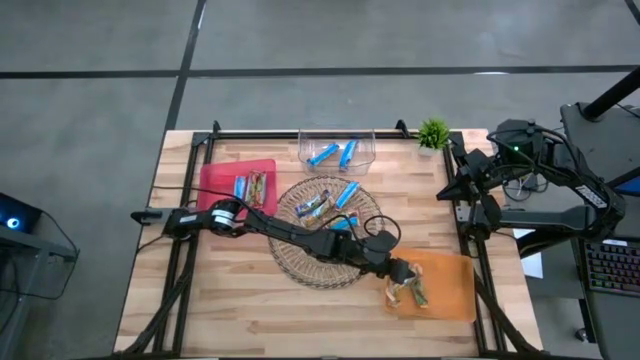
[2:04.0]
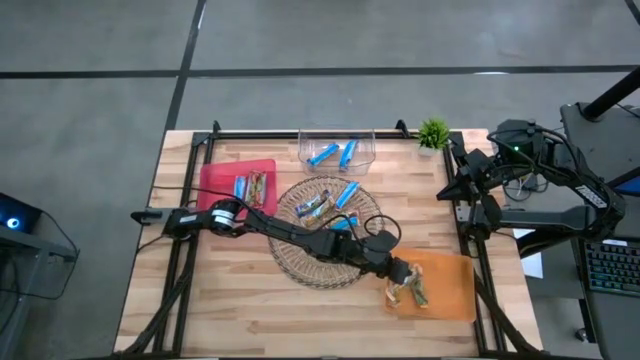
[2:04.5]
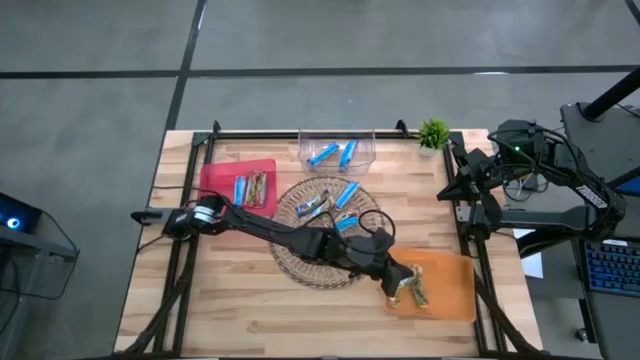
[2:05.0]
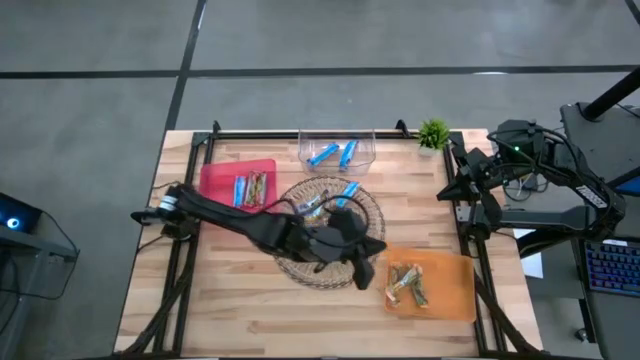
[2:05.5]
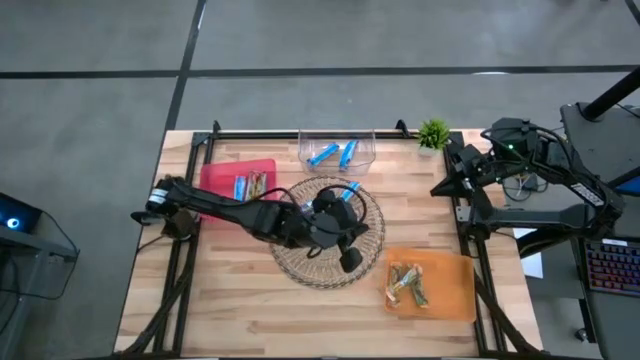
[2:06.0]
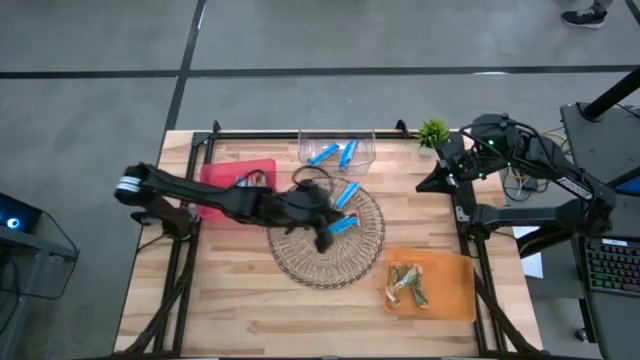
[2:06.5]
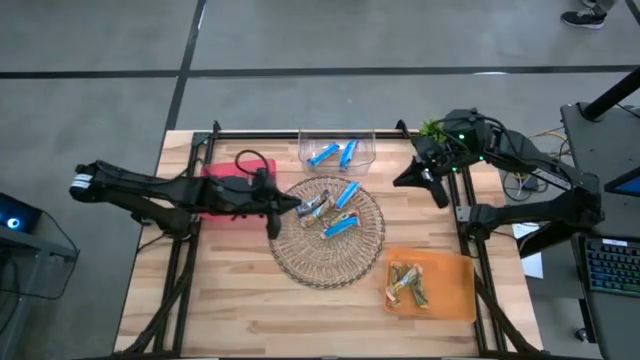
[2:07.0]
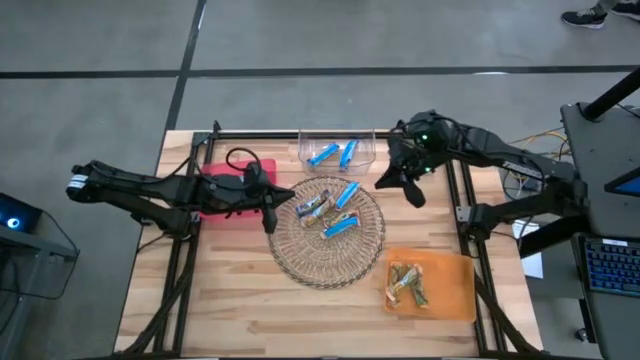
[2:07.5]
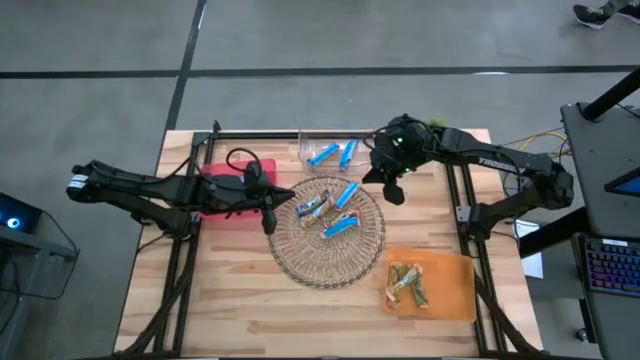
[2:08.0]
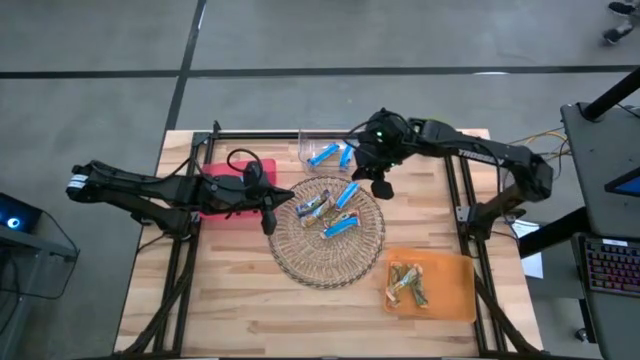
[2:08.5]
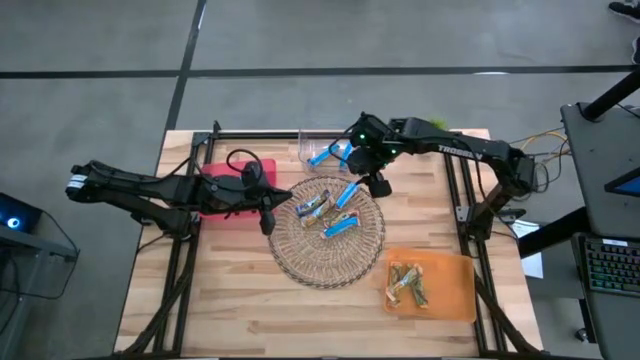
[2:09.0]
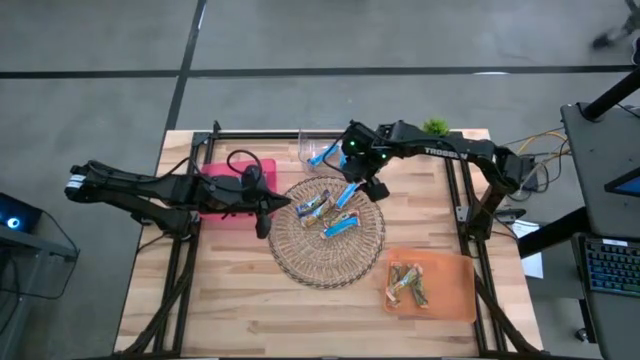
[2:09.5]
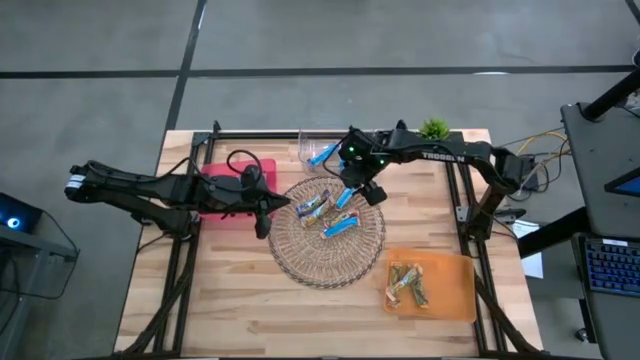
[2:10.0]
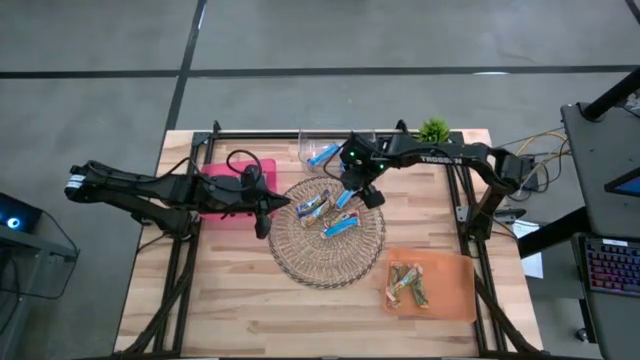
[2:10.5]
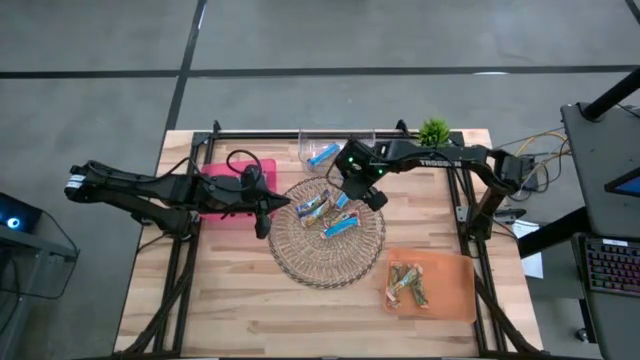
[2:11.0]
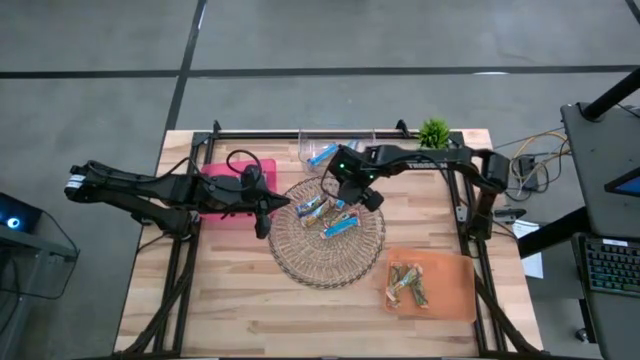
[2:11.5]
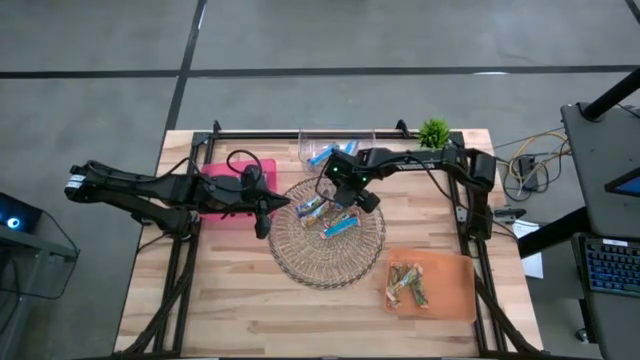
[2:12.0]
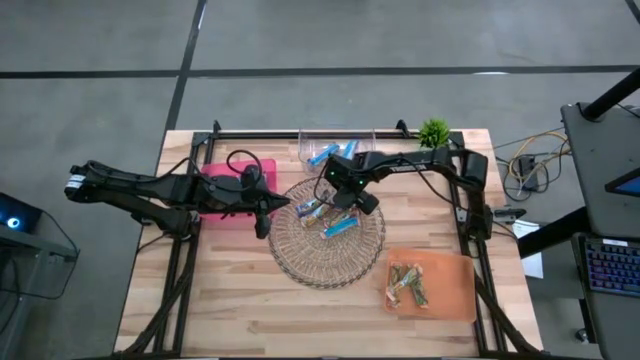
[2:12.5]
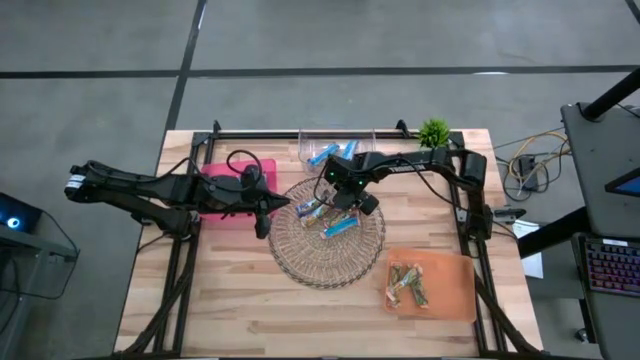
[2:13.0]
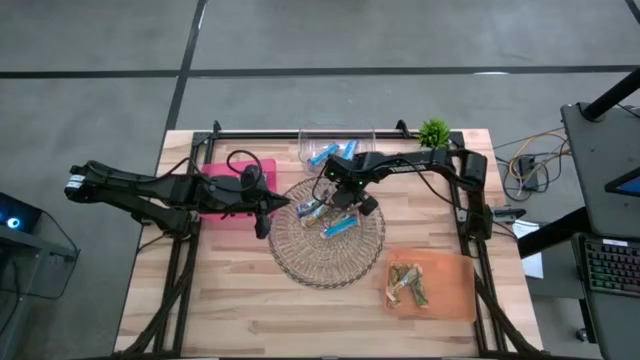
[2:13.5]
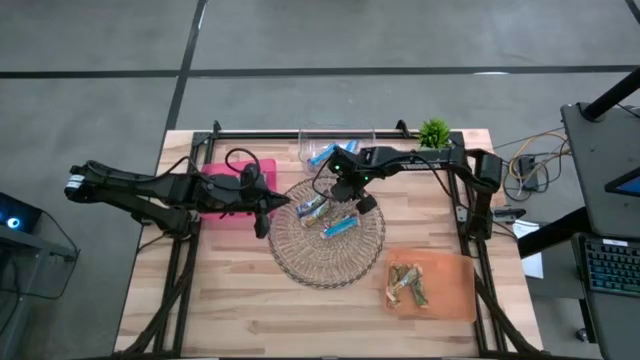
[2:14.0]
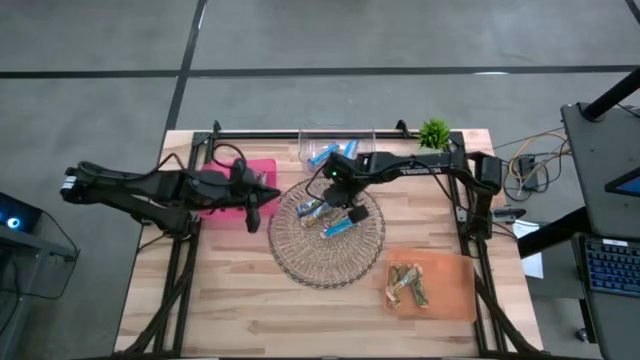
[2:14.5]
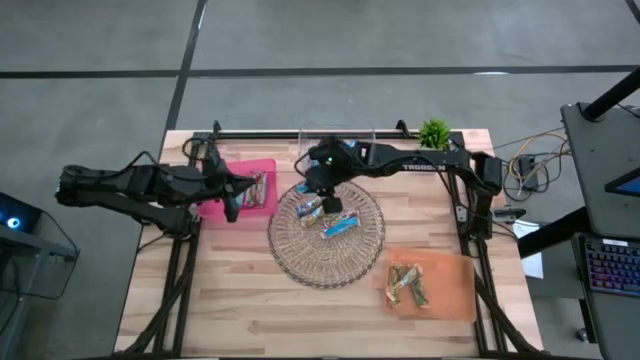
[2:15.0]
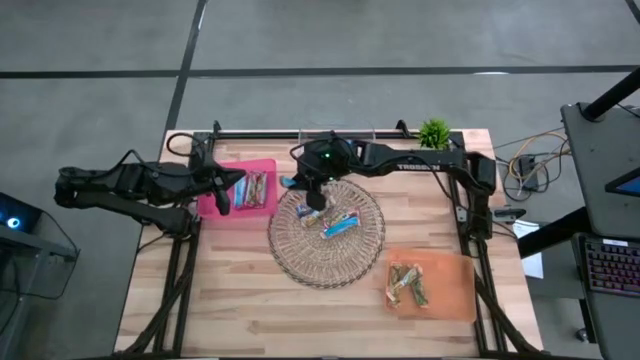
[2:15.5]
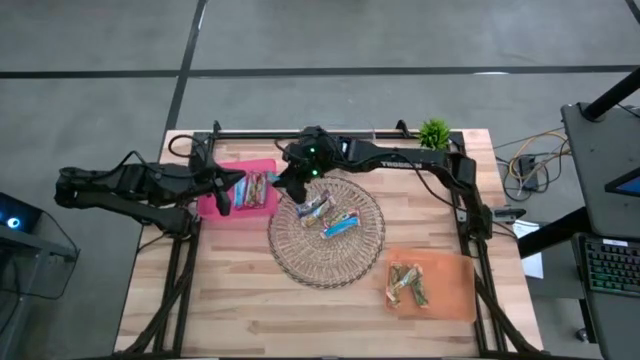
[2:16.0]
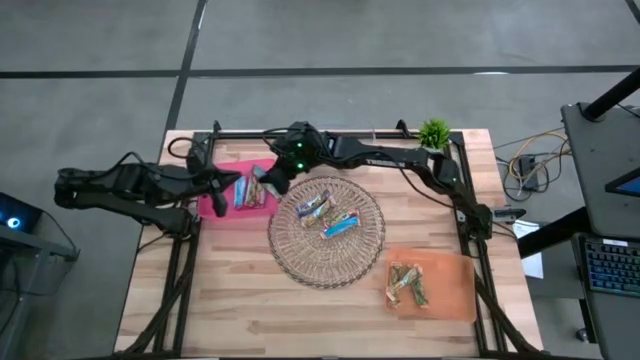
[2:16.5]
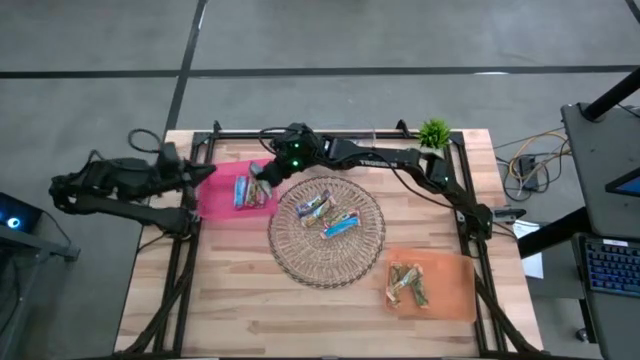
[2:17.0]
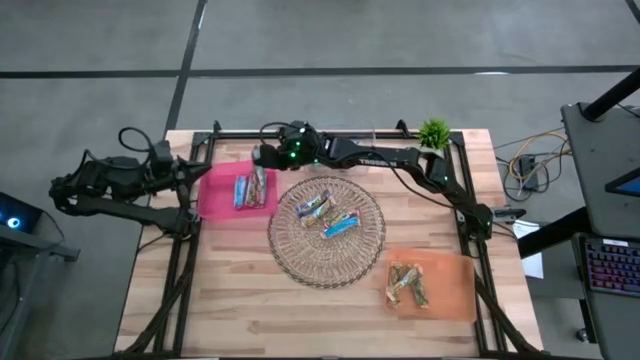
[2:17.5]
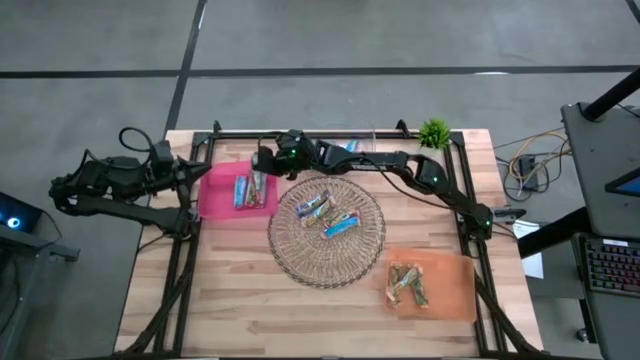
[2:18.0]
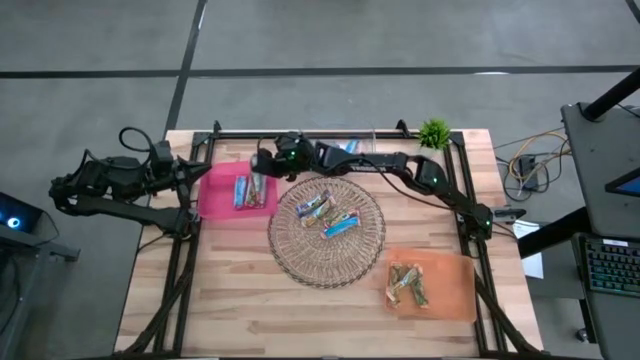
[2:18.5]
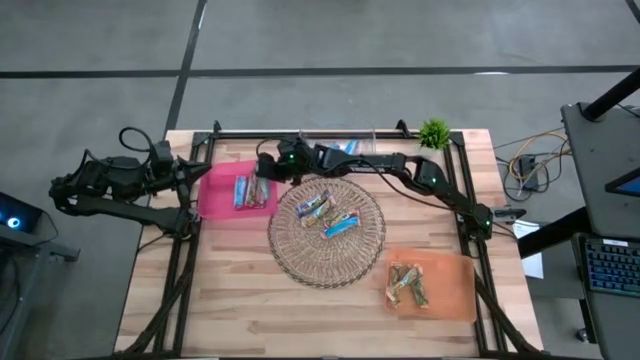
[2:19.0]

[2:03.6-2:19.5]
Task: Pick and place Granola Bars by type
Put the red granola bar into the red bin

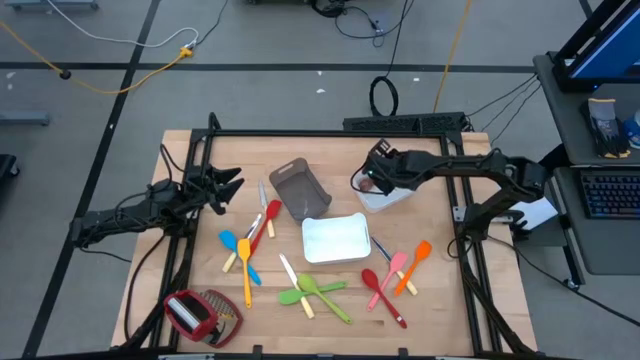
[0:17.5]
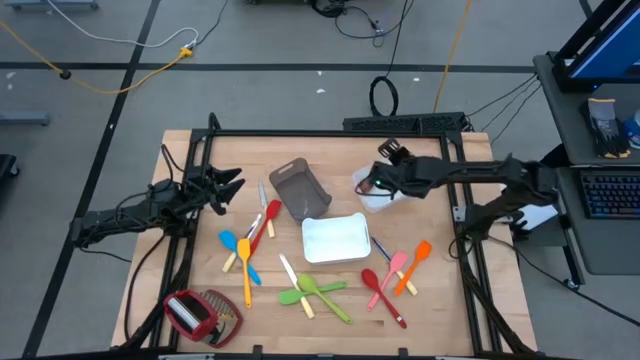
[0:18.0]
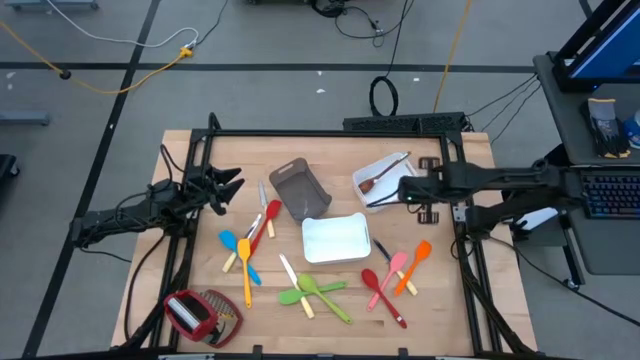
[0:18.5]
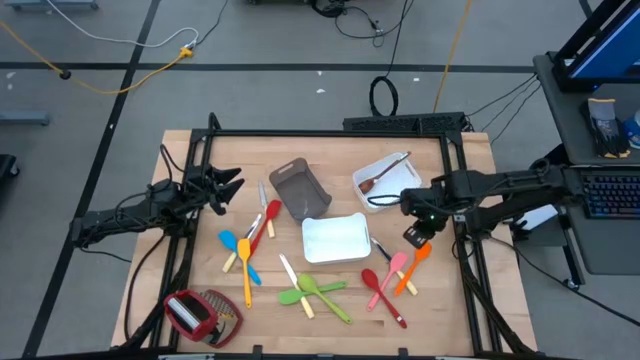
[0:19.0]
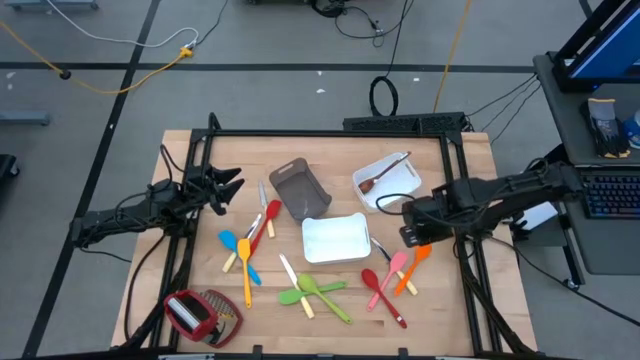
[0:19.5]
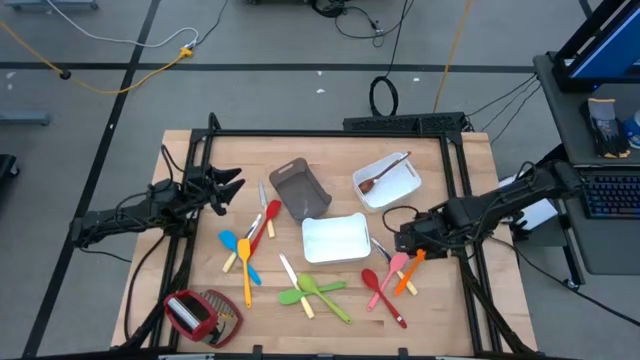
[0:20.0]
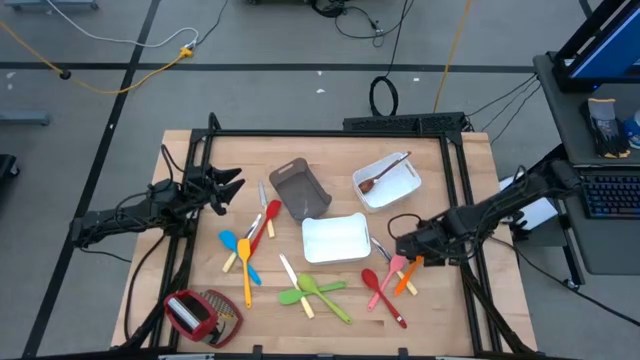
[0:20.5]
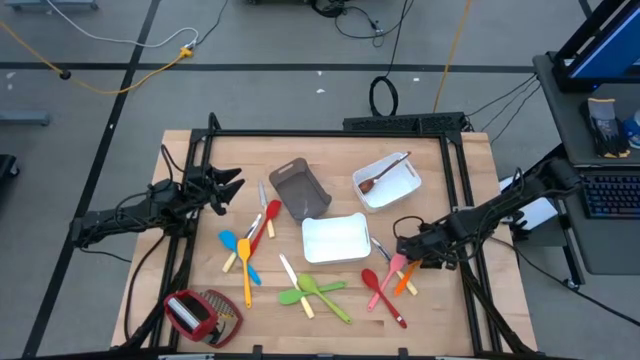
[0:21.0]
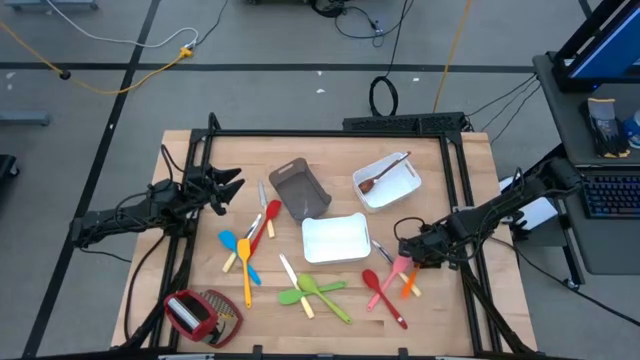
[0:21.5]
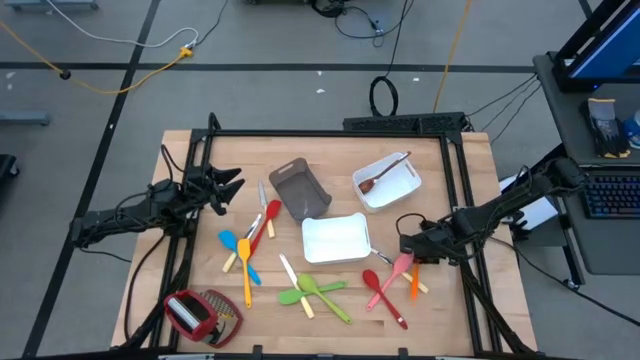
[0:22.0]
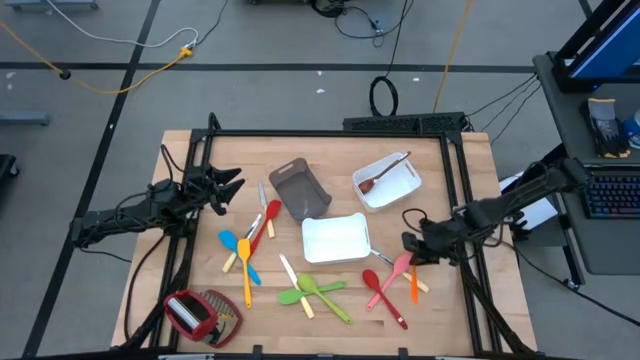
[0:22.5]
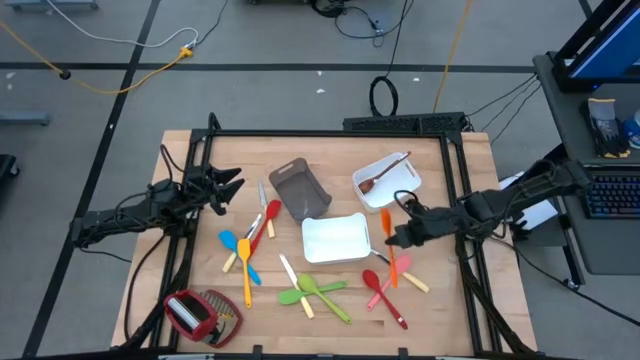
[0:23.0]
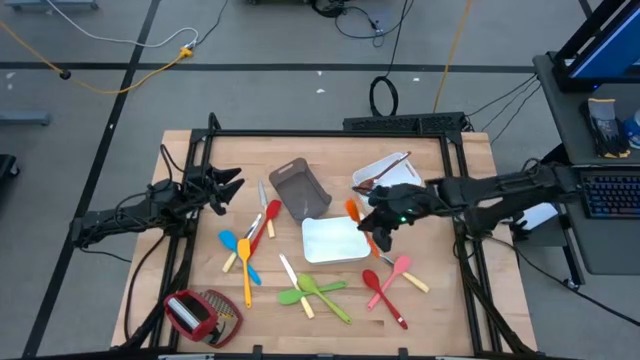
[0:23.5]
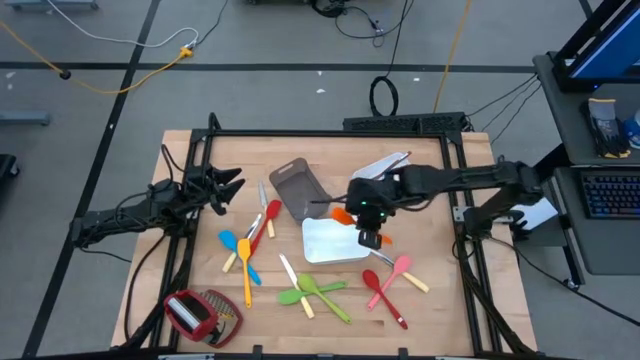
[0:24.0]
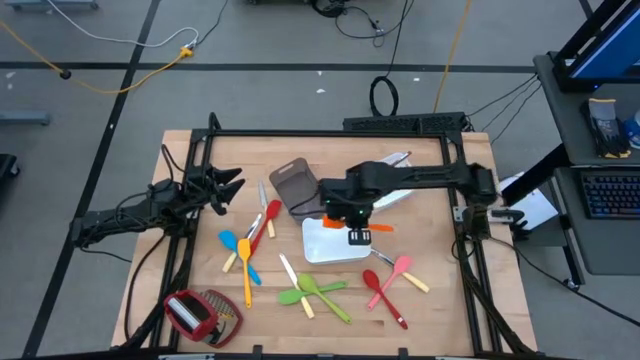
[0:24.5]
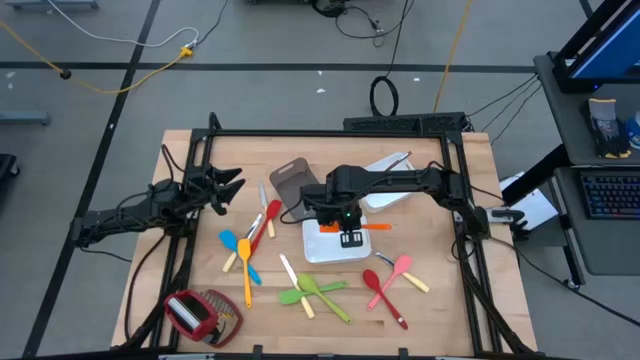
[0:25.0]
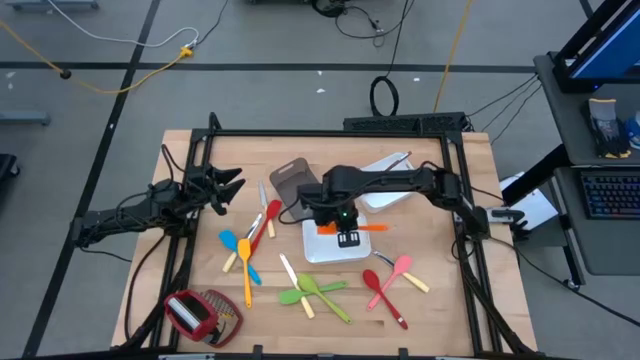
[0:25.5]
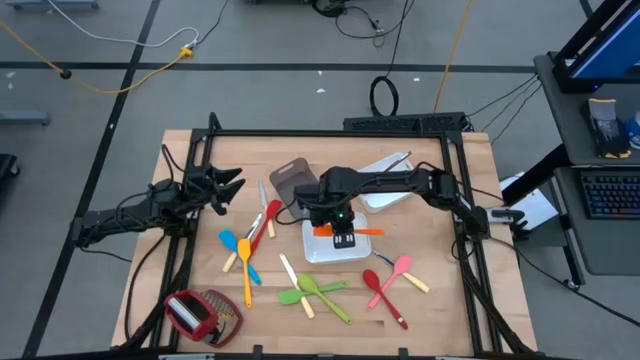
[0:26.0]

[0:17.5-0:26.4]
Task: Pick & Place Kitchen Items
Put the orange spatula into bottom white bin
